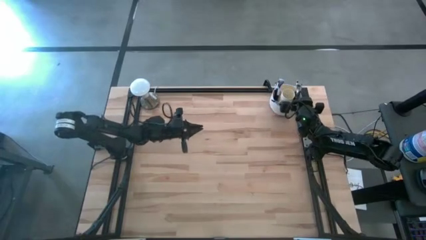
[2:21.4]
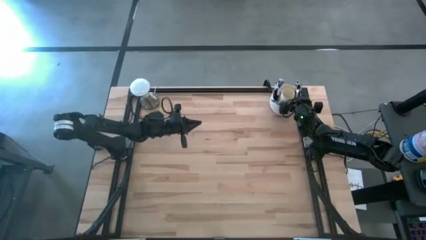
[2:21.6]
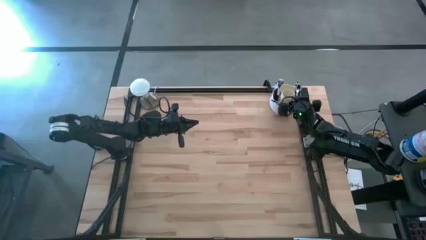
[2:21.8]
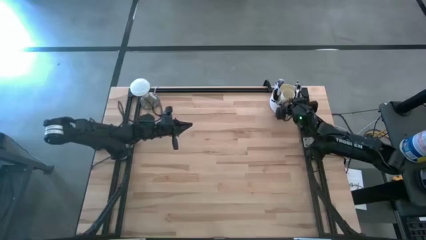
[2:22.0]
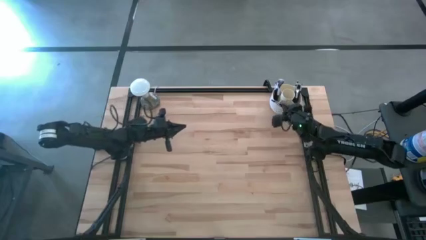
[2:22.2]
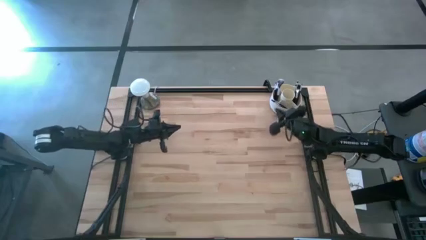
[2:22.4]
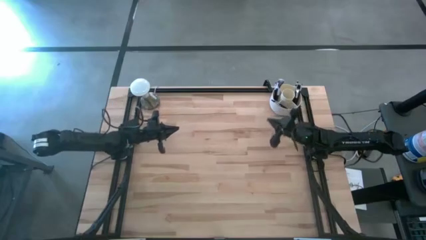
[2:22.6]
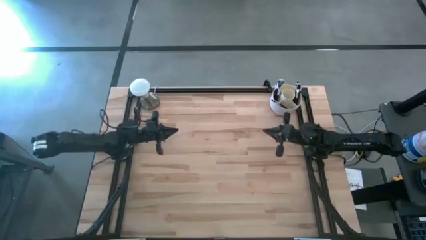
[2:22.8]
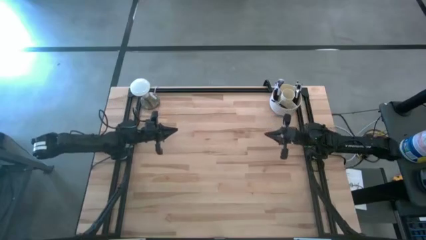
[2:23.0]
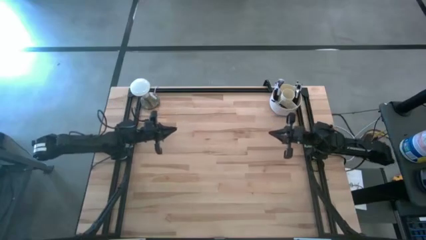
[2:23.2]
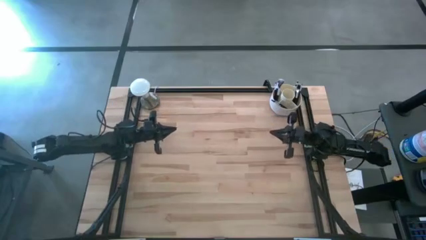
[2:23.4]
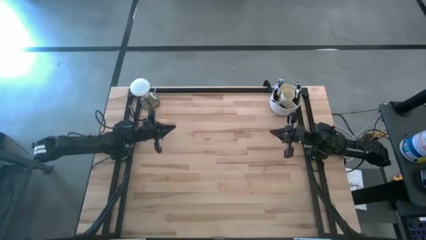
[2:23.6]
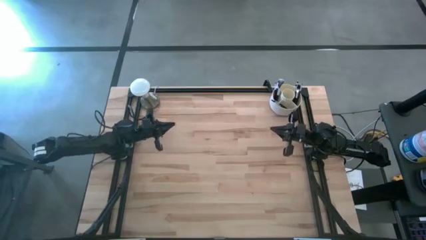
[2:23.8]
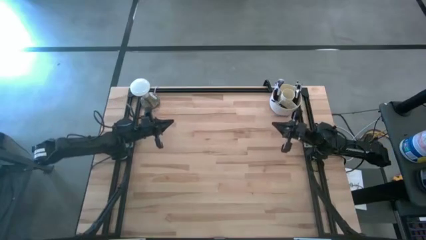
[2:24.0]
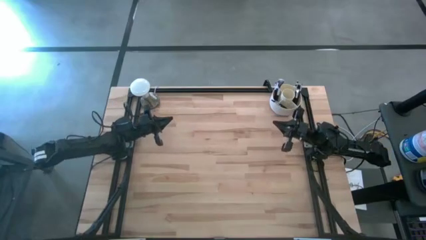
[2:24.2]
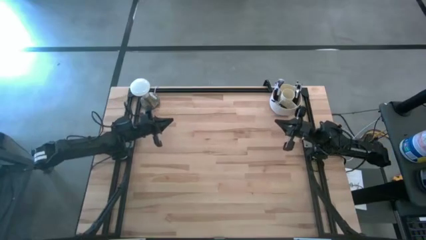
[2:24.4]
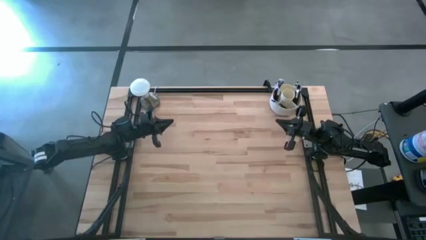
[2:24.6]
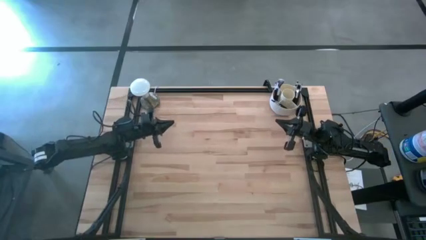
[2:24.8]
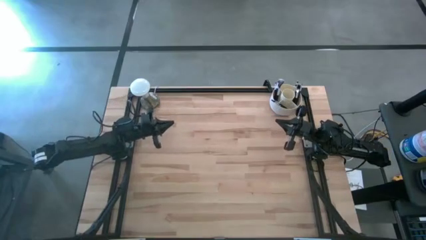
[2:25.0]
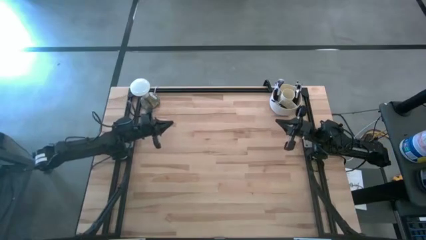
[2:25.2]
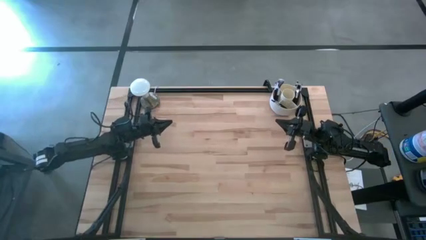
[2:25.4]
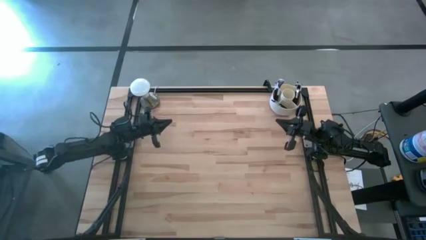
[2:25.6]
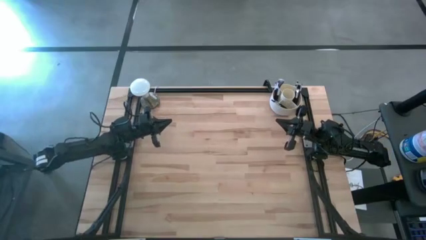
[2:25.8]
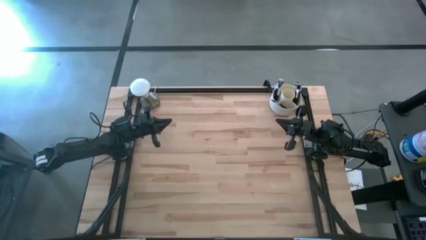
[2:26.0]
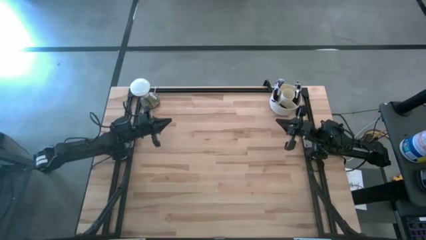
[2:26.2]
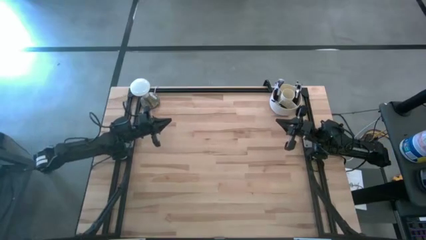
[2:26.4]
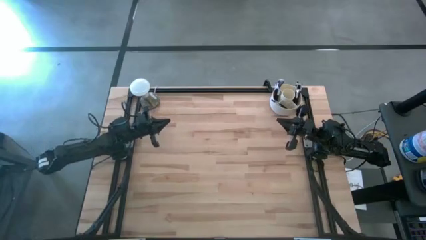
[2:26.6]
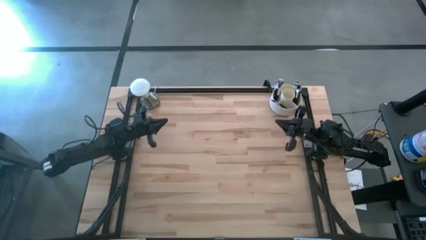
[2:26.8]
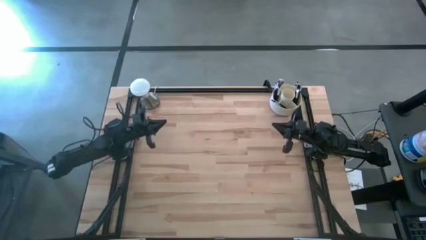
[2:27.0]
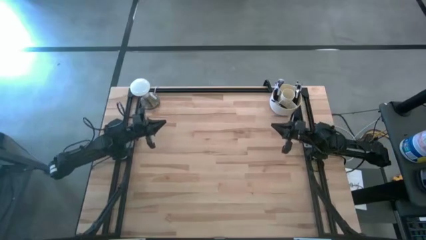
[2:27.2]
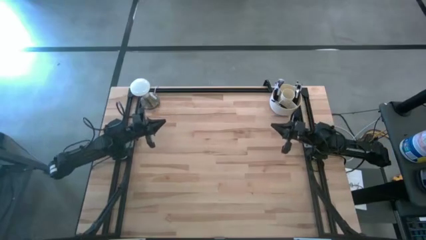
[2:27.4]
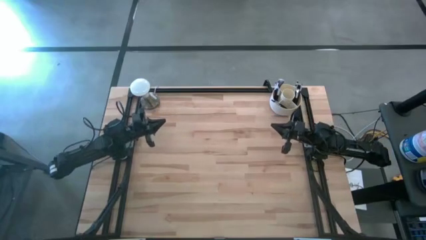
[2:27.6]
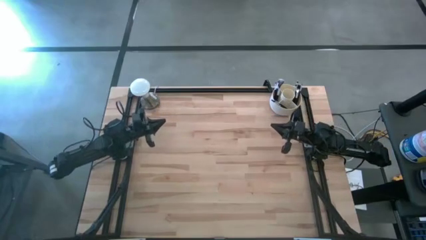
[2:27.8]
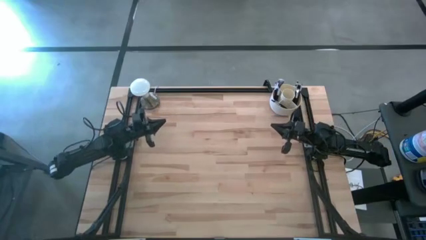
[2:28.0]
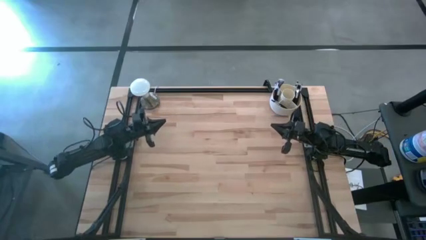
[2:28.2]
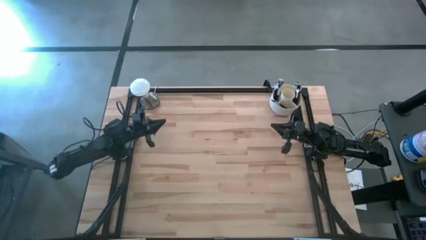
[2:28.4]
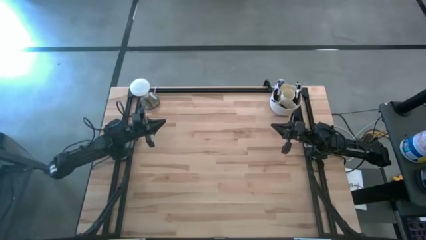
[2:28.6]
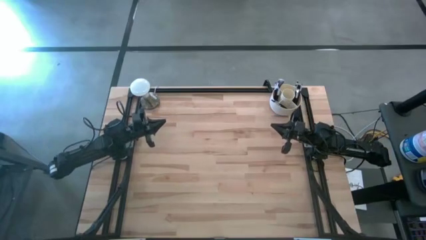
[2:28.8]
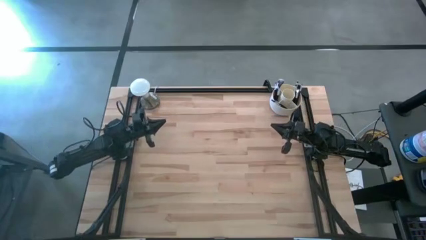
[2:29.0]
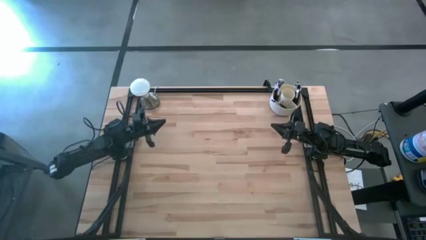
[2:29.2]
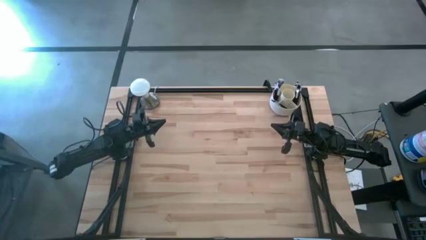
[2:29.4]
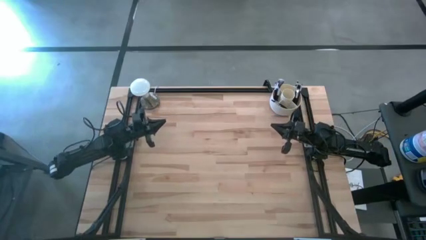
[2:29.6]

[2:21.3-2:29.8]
Task: Put items in baskets/containers
Return to Home Position

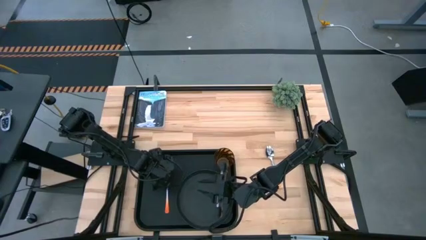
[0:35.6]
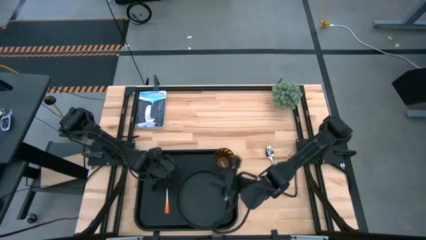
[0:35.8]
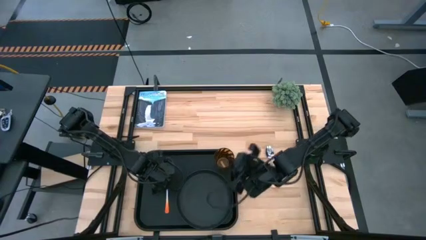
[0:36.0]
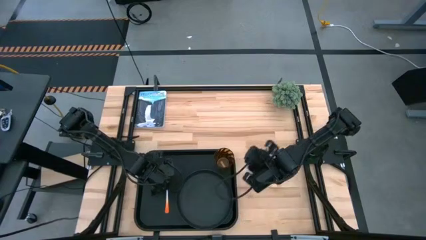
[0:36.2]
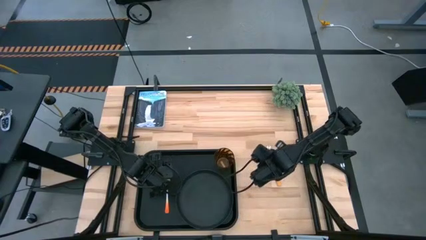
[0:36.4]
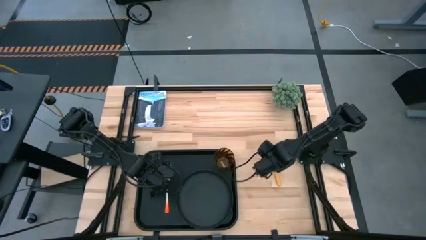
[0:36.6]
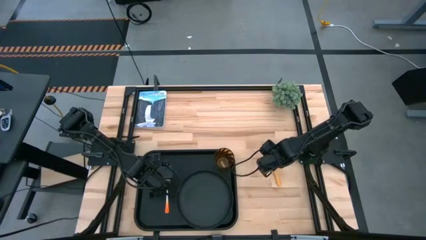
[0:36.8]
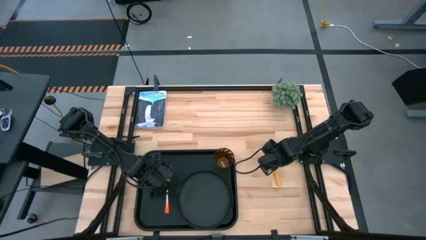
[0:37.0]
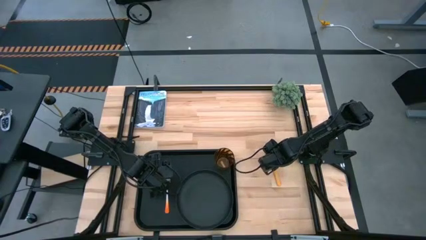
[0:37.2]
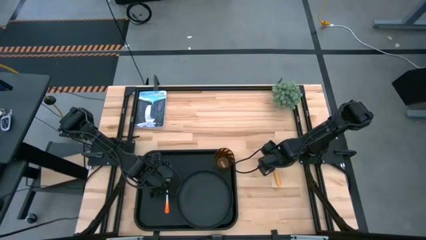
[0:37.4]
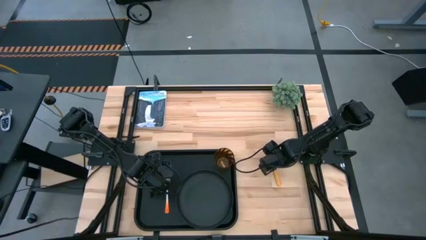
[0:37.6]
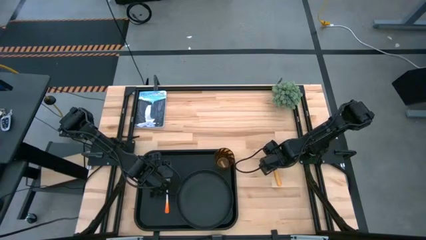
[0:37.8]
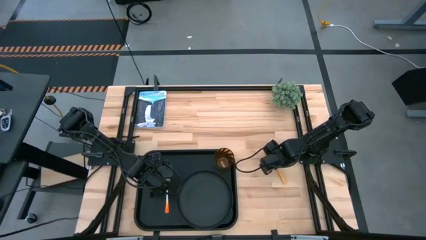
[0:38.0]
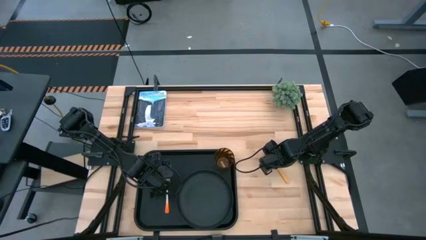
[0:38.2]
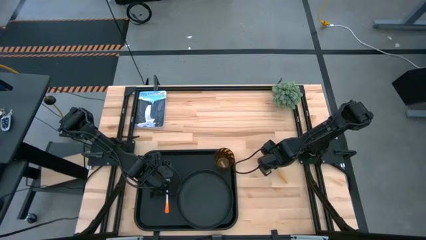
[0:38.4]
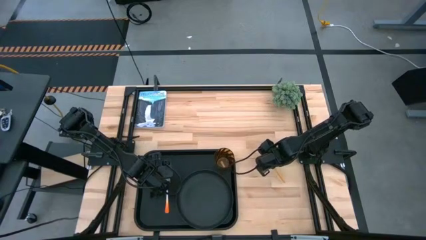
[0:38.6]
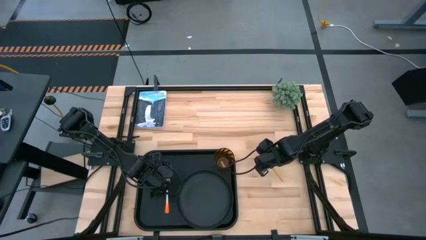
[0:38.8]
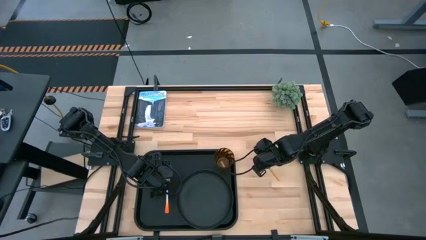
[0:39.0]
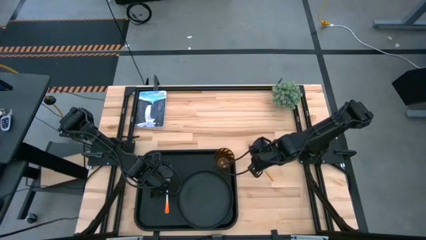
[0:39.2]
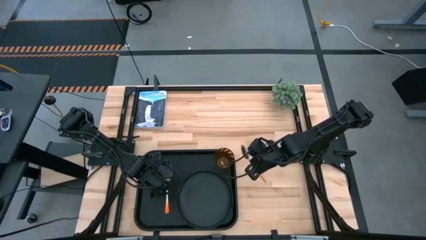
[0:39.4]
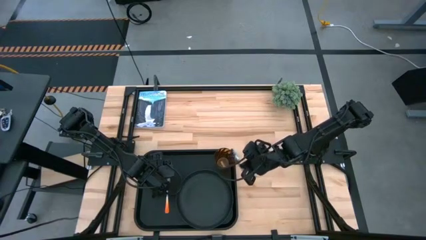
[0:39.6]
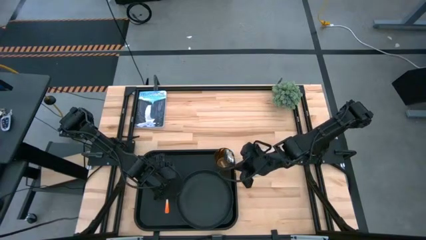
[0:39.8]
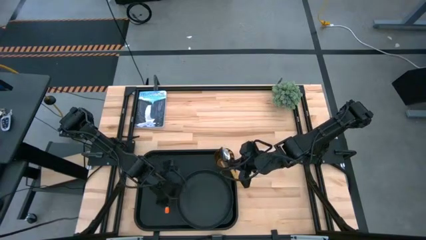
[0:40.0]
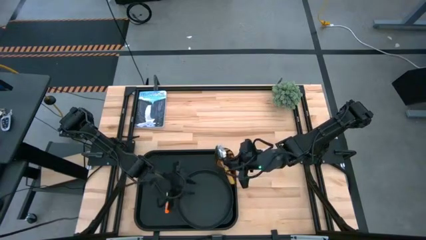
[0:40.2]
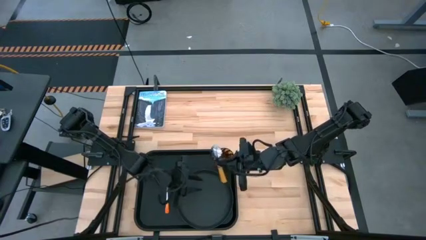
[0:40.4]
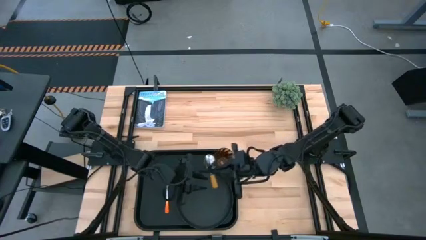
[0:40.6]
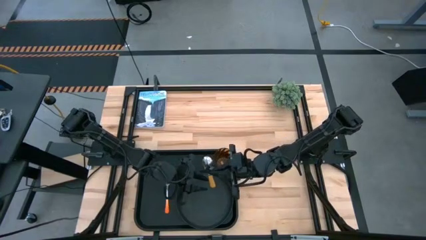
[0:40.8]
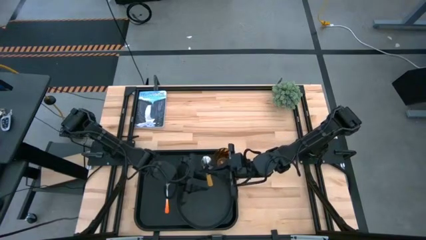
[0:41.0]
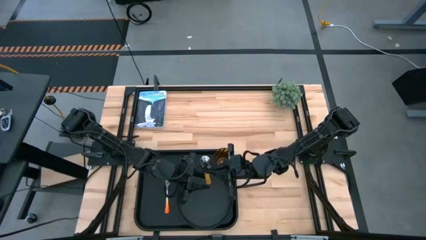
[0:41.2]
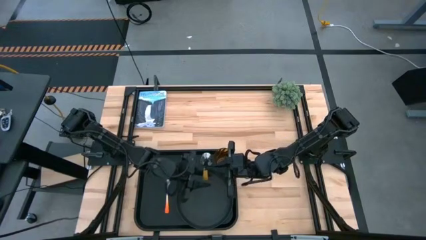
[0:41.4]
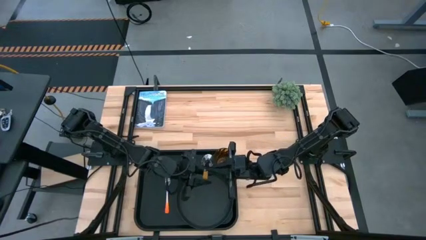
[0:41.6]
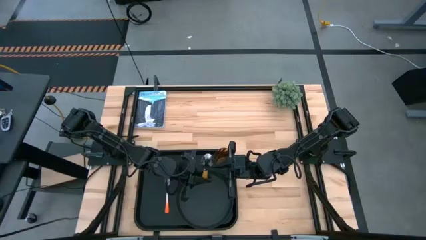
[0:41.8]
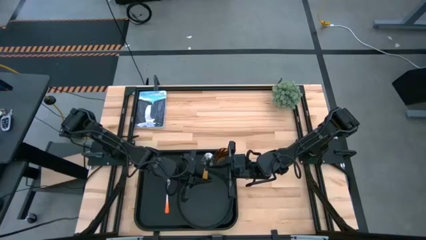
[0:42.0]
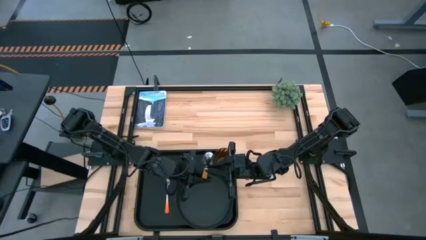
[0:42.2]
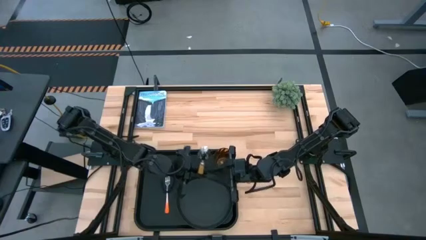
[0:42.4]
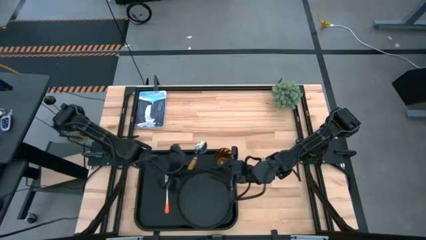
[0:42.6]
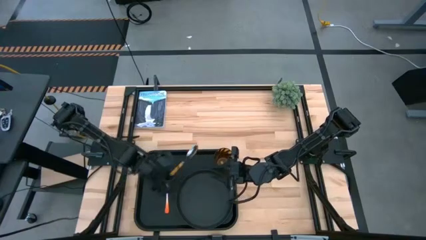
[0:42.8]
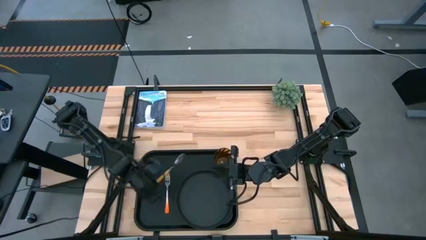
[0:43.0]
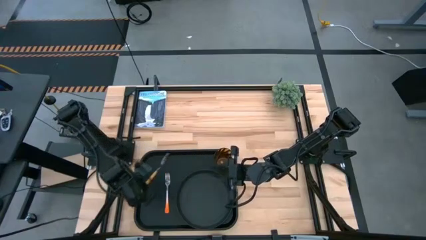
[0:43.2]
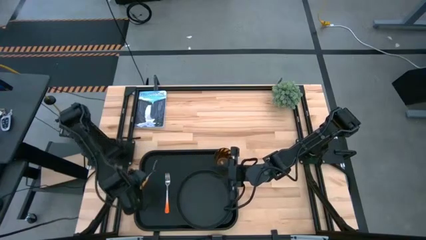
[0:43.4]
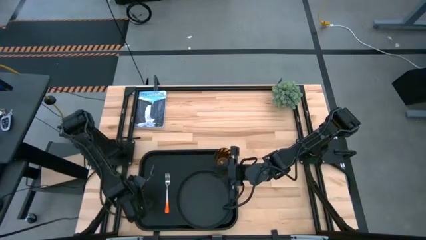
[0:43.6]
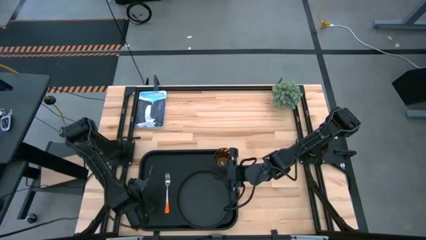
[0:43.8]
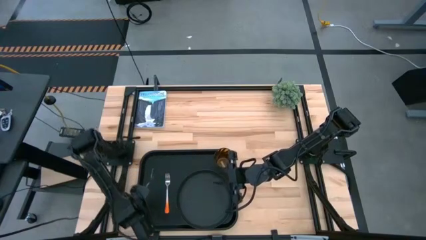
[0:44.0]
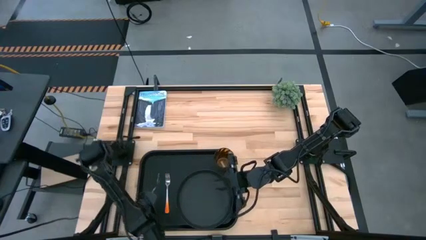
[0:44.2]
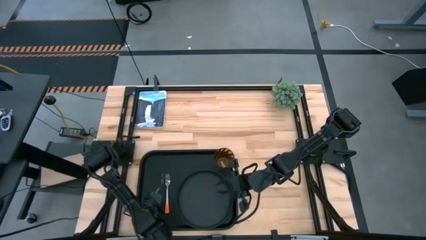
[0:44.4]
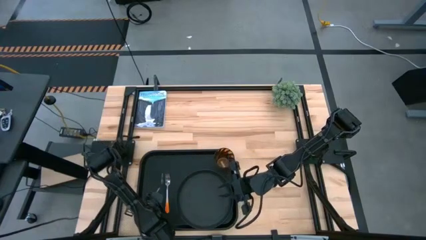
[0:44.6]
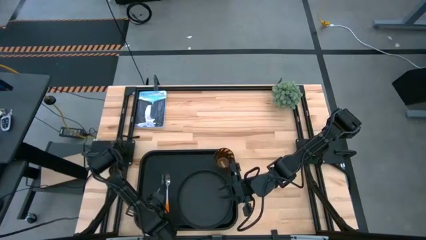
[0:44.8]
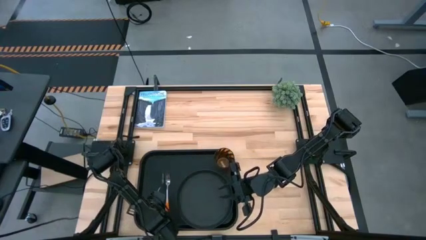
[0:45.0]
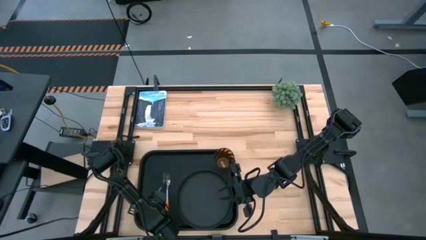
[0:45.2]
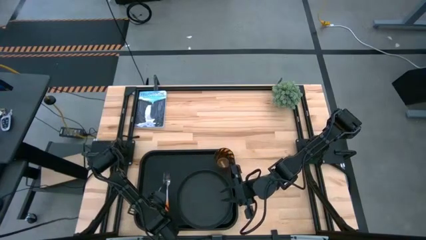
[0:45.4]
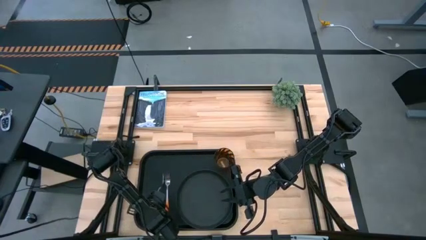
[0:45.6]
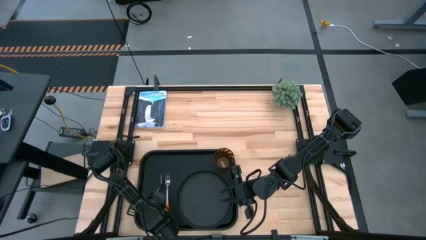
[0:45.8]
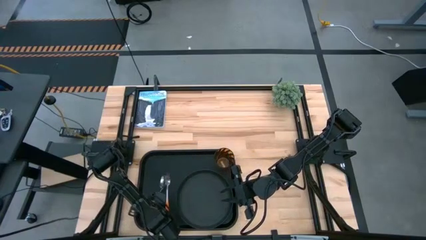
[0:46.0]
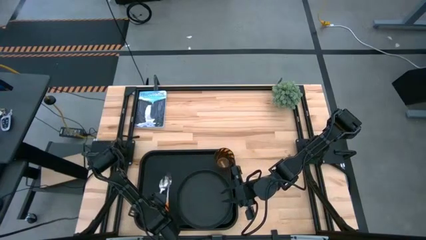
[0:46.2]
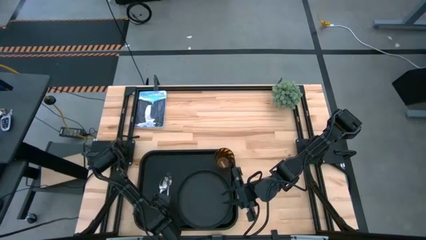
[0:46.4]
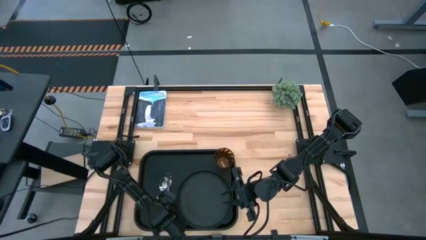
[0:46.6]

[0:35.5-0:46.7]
Task: Pick and place plate/cup/fork/spoon on tray
Put the yellow spoon to the left of the orange fork on the black serving tray
